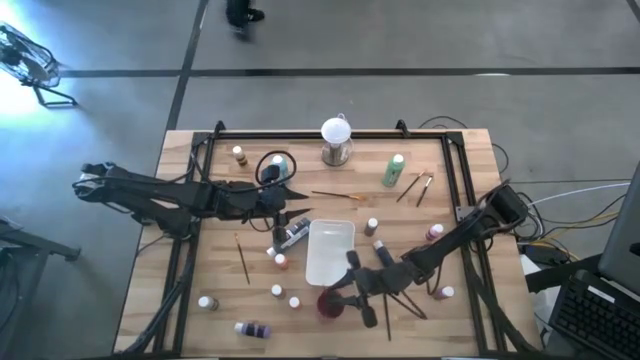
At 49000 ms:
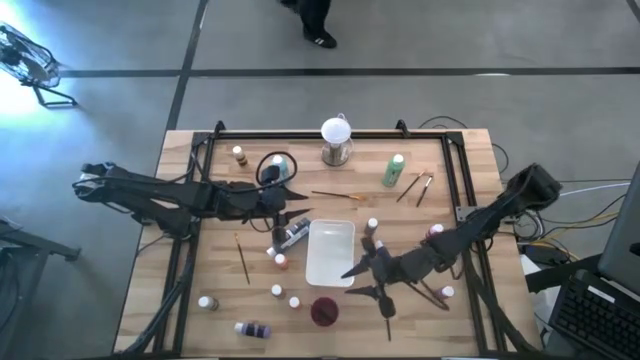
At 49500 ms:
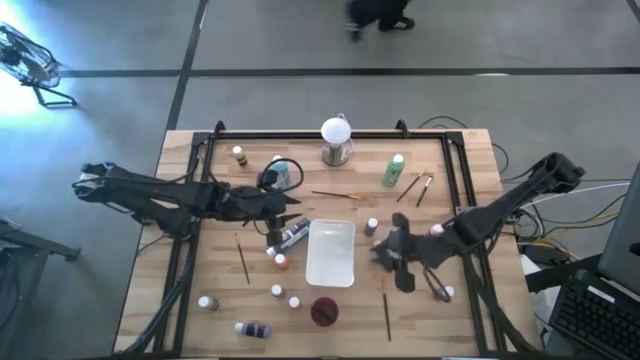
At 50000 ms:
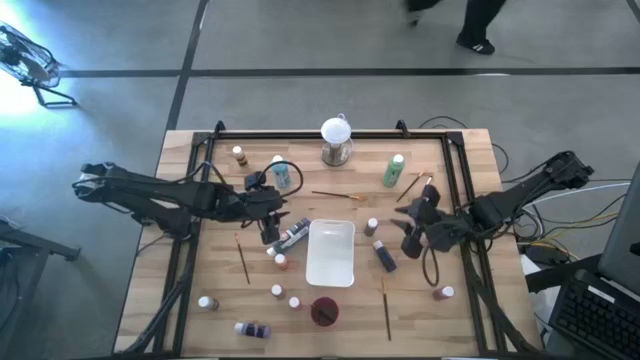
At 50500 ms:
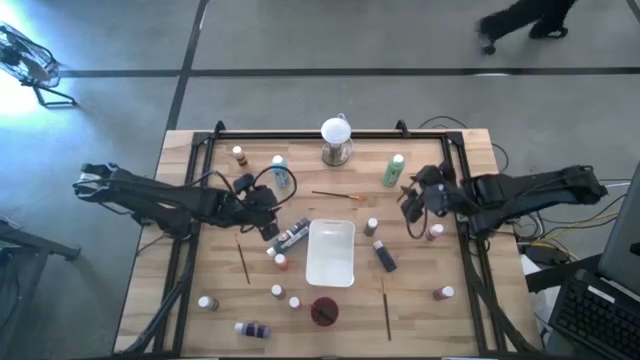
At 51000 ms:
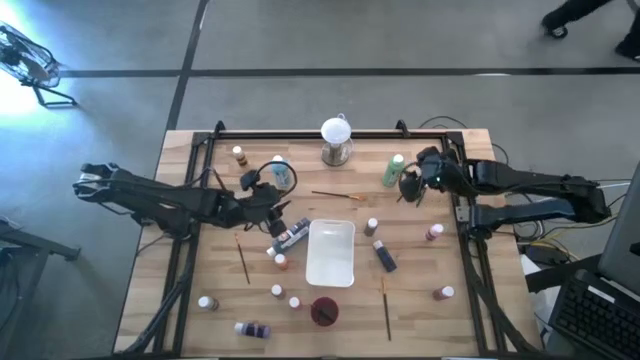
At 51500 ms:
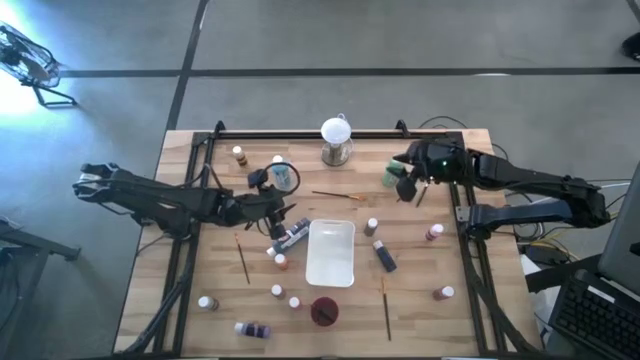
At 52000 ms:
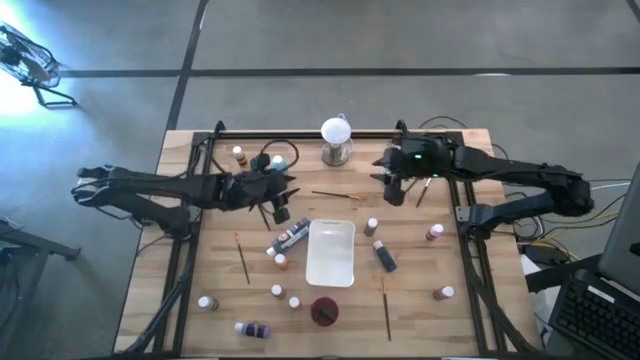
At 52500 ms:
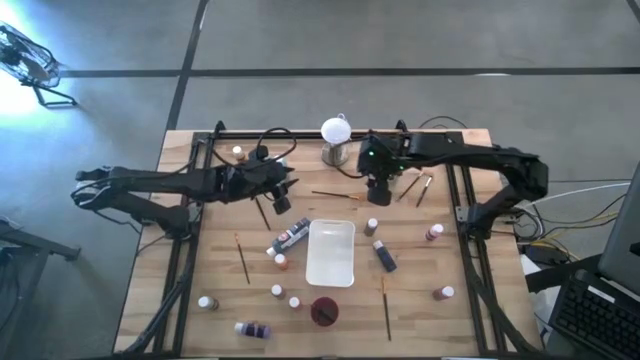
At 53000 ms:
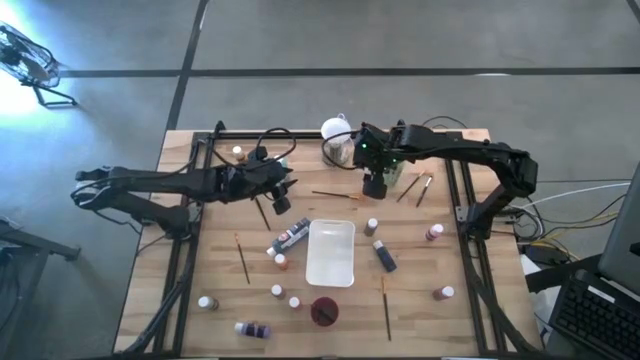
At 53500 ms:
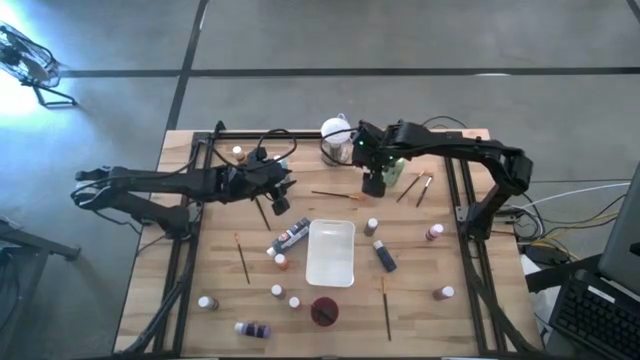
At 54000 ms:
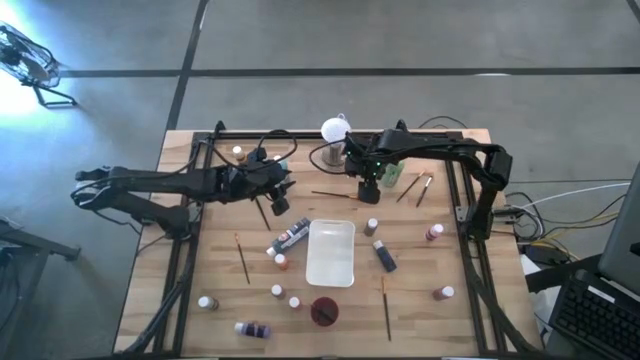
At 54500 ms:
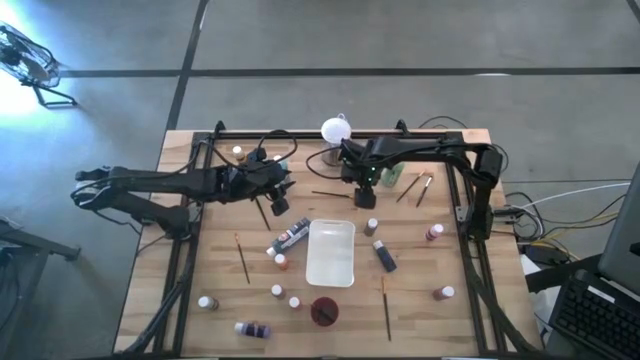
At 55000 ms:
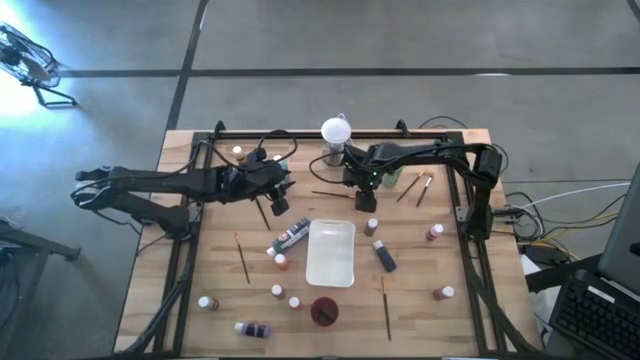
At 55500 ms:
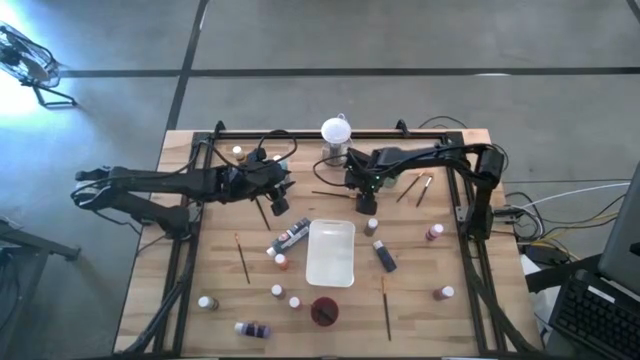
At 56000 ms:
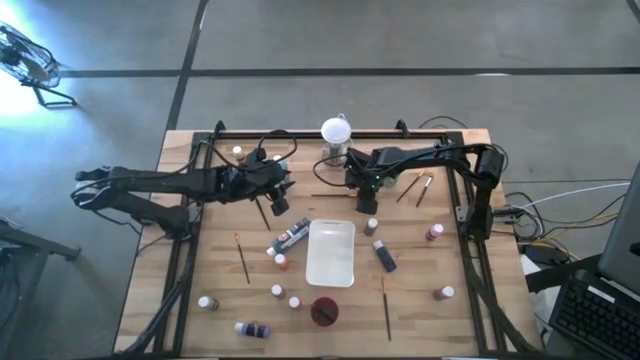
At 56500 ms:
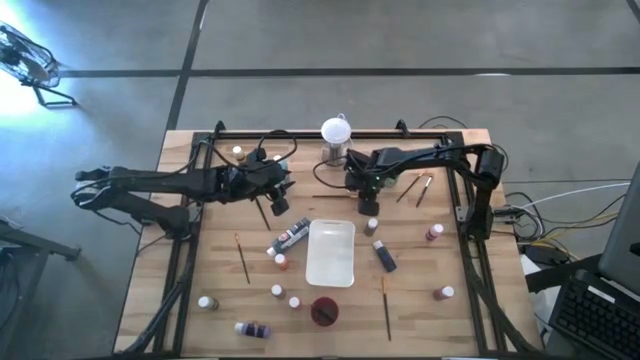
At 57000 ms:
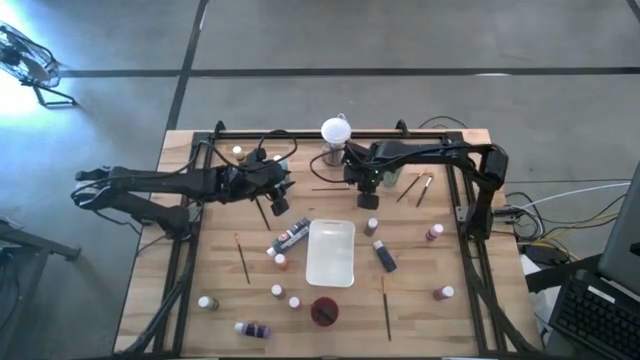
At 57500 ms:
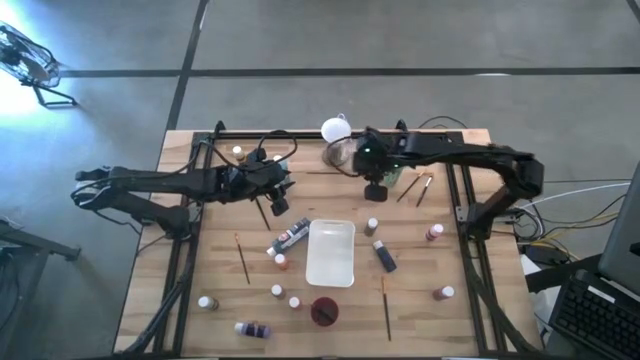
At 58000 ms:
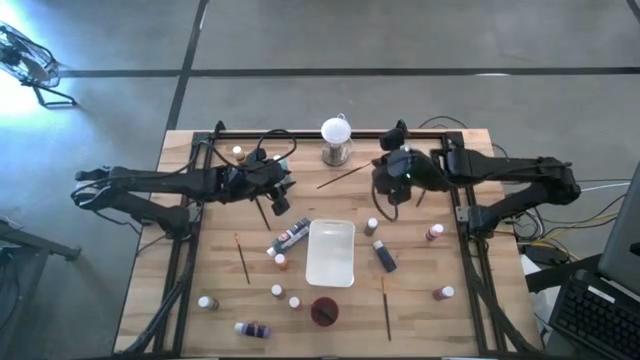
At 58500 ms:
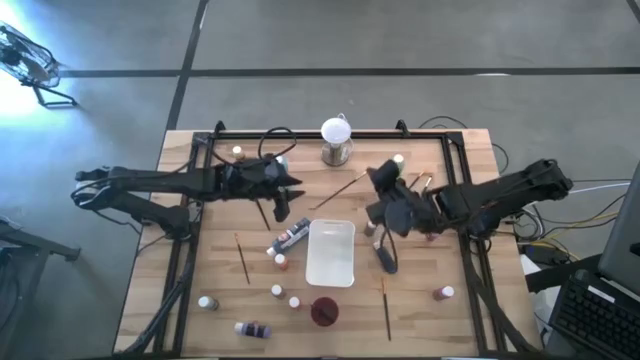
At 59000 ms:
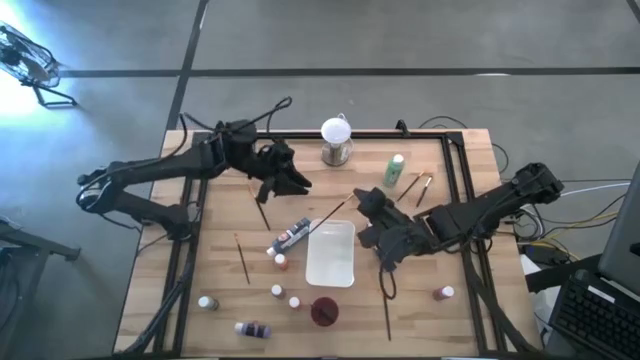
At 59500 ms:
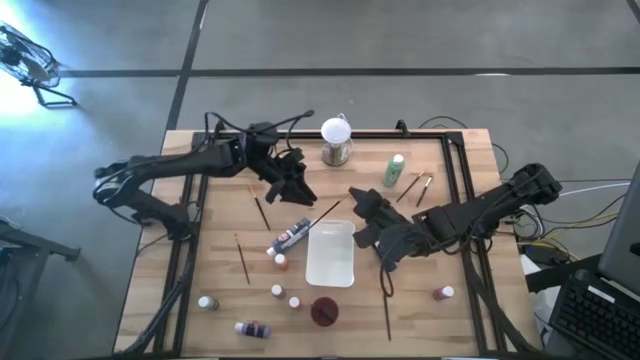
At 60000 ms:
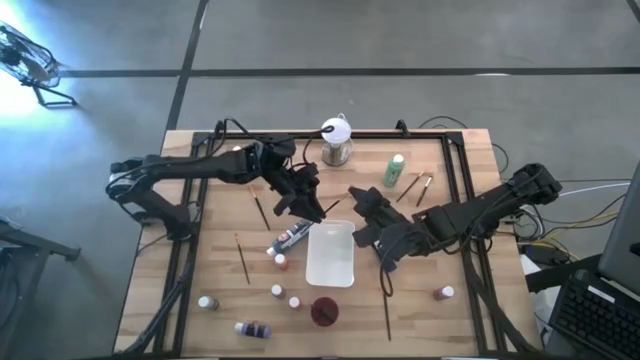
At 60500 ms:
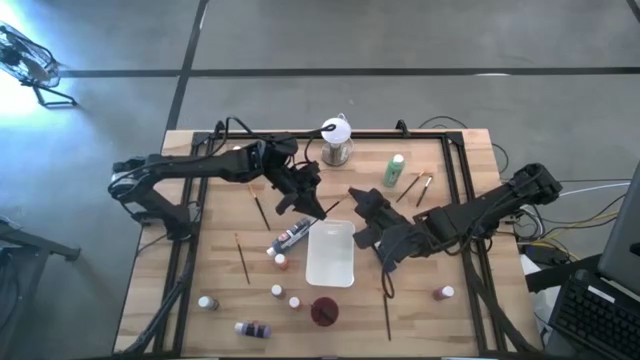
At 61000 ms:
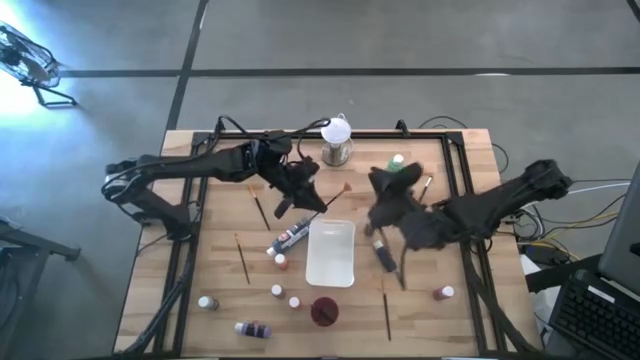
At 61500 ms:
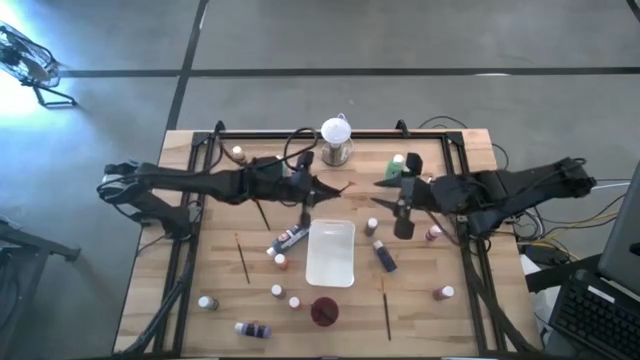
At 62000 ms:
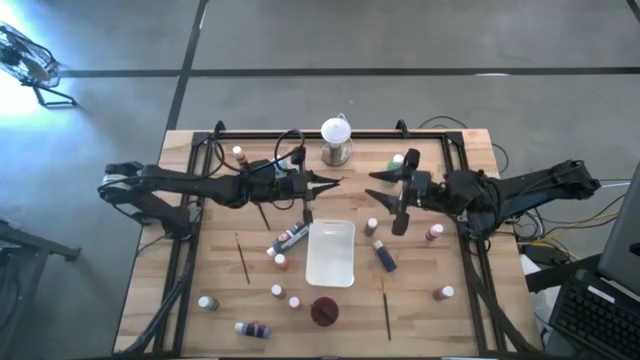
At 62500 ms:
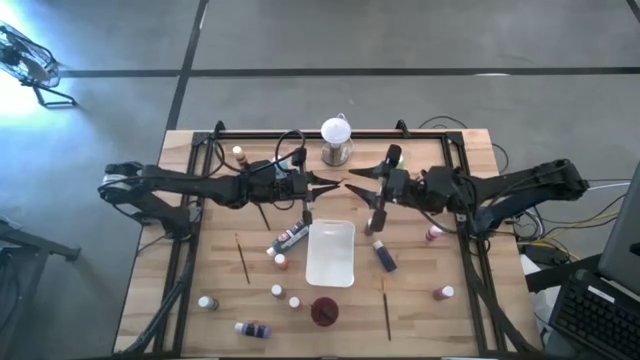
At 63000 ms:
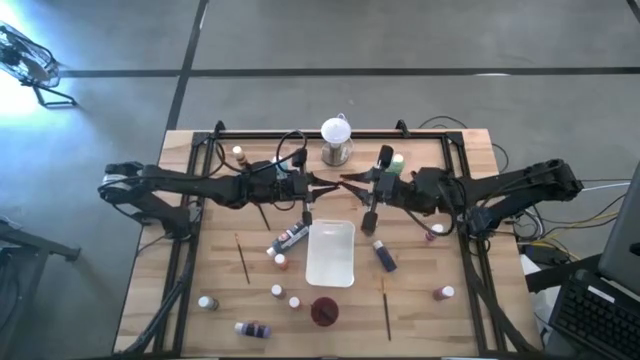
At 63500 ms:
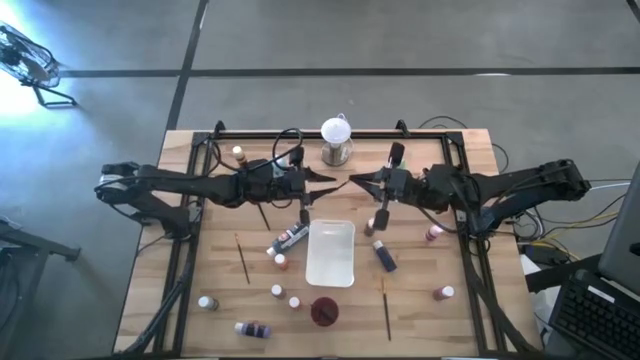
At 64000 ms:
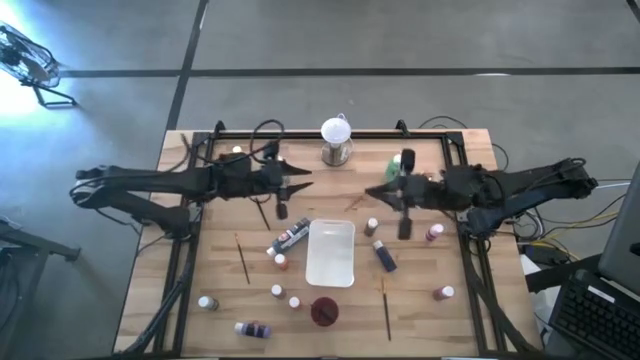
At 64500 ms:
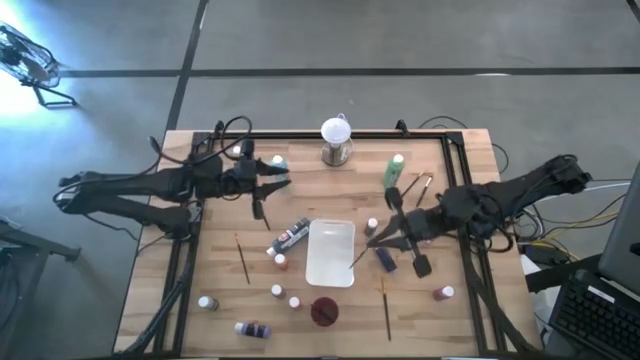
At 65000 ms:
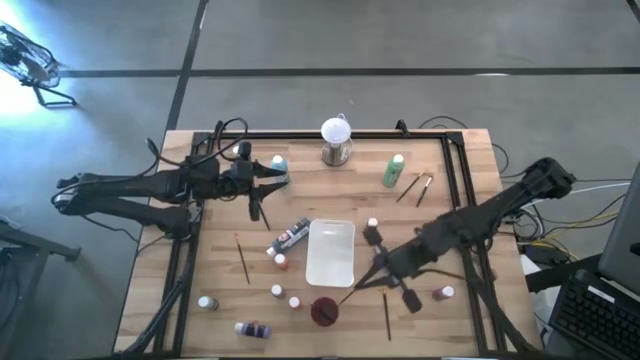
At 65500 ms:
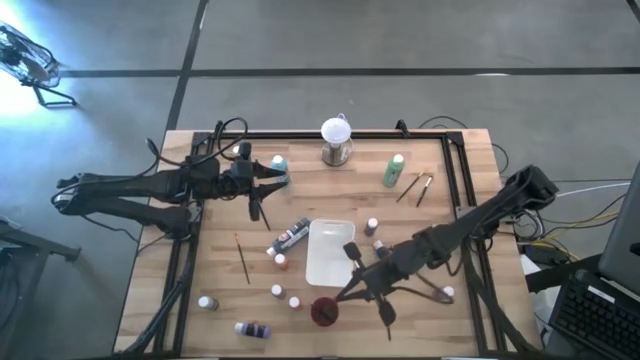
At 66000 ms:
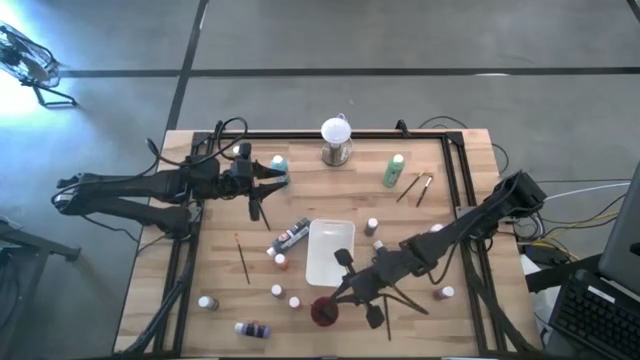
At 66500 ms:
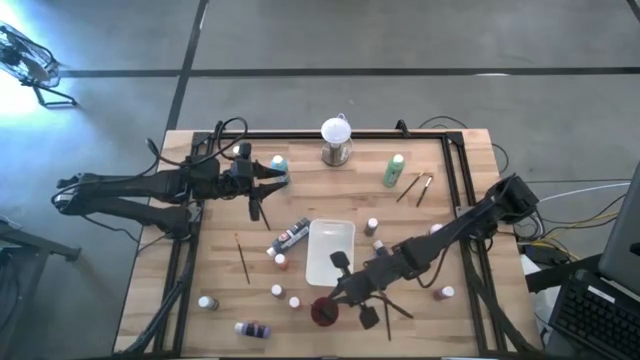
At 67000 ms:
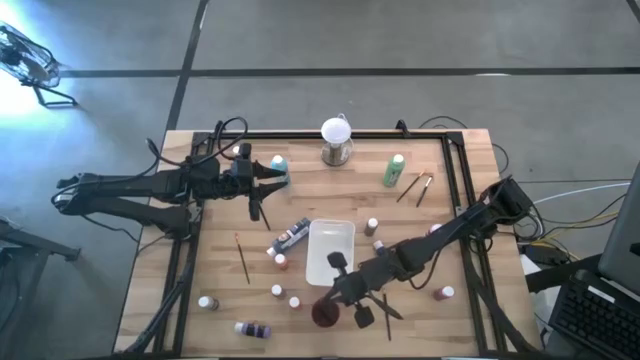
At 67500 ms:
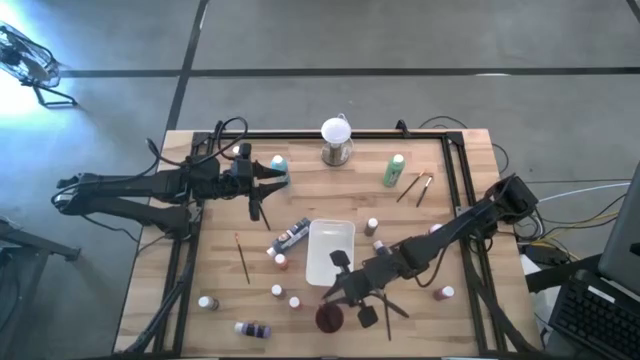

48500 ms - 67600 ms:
Task: Pick & Place Paint Supplies
Put the gold paint brush into the red cup
